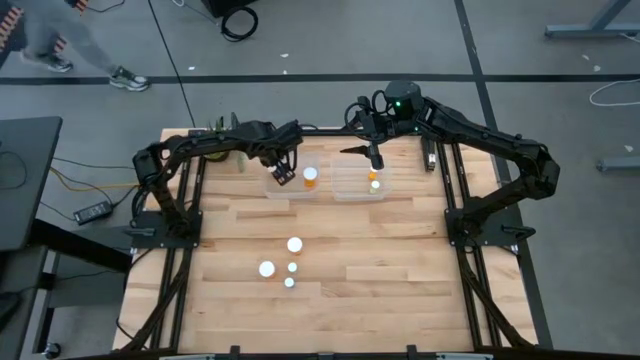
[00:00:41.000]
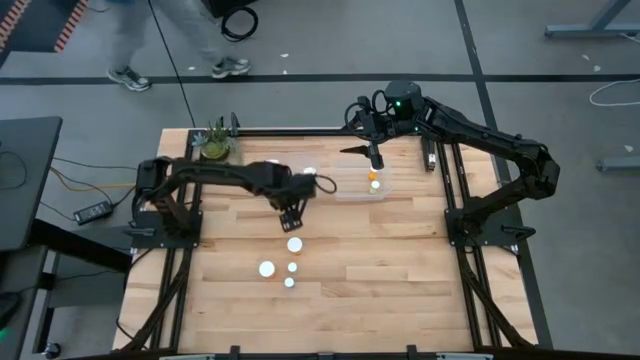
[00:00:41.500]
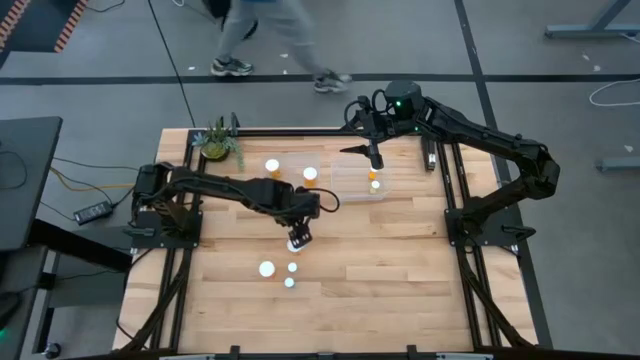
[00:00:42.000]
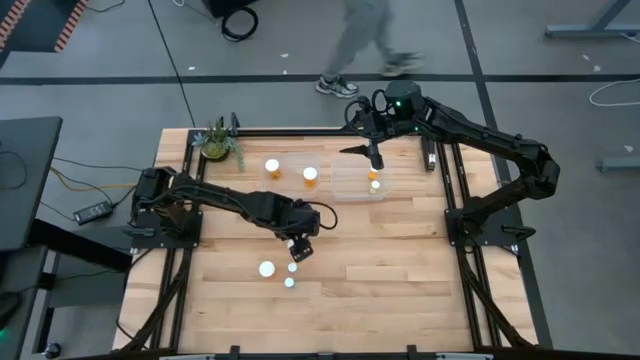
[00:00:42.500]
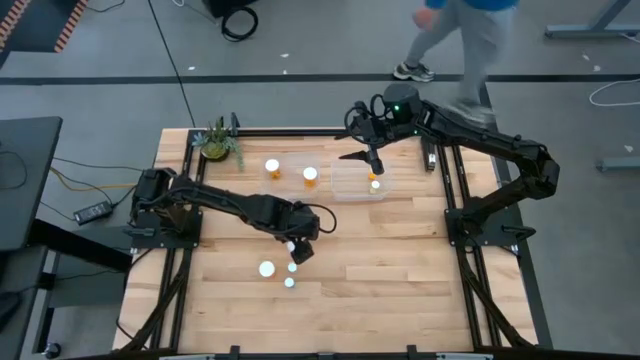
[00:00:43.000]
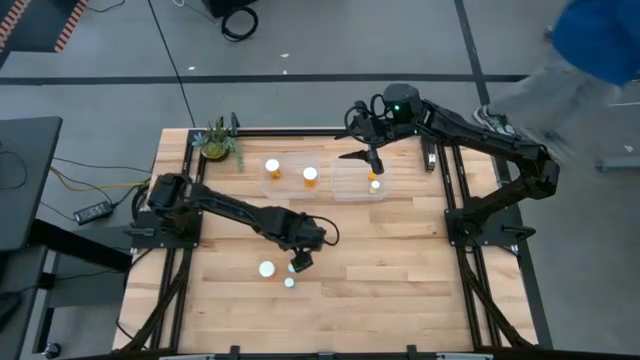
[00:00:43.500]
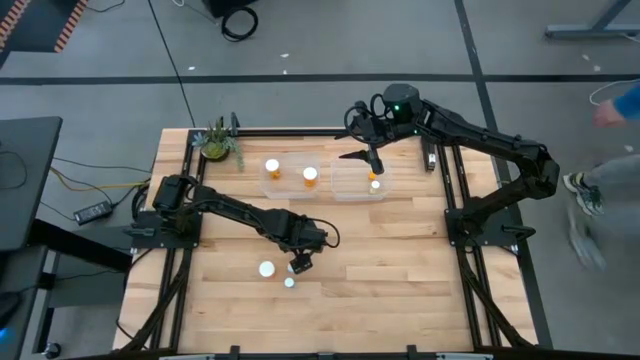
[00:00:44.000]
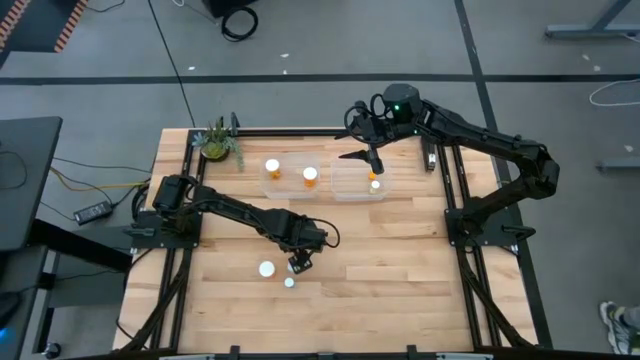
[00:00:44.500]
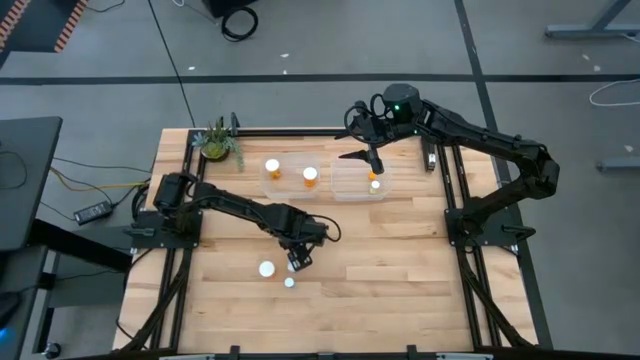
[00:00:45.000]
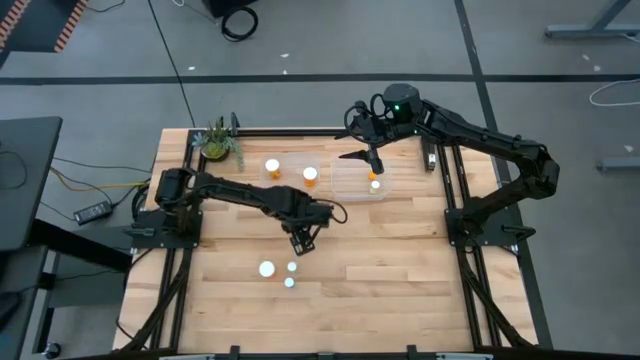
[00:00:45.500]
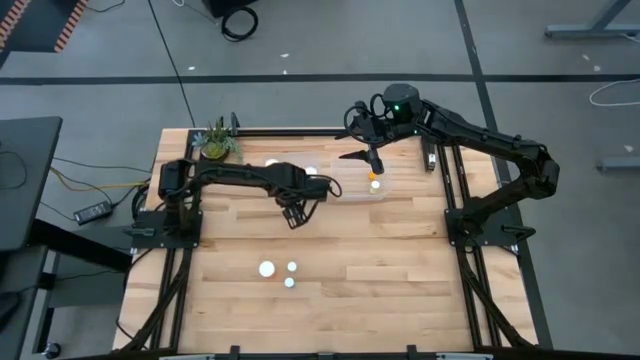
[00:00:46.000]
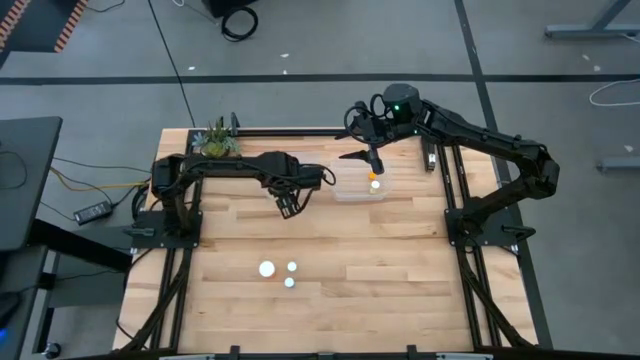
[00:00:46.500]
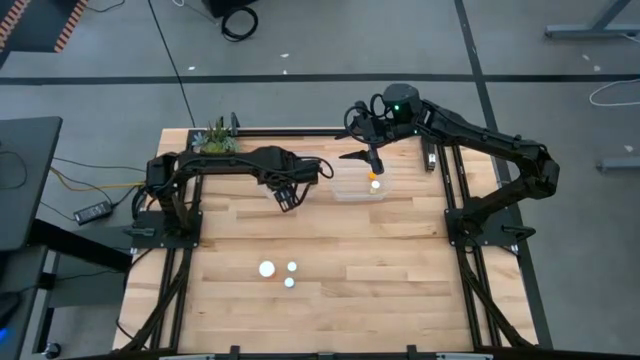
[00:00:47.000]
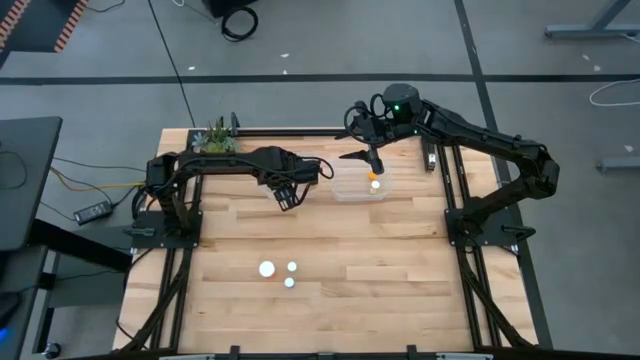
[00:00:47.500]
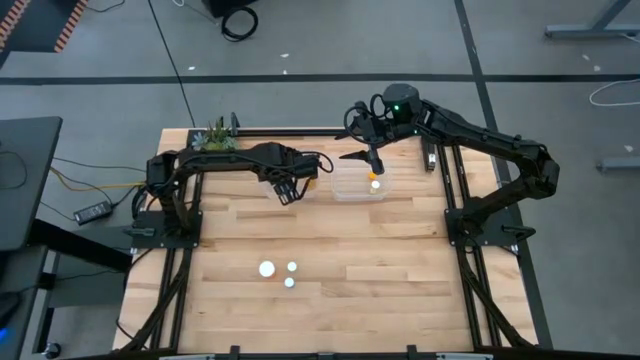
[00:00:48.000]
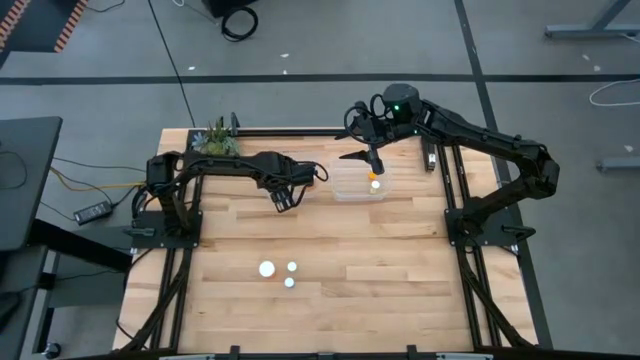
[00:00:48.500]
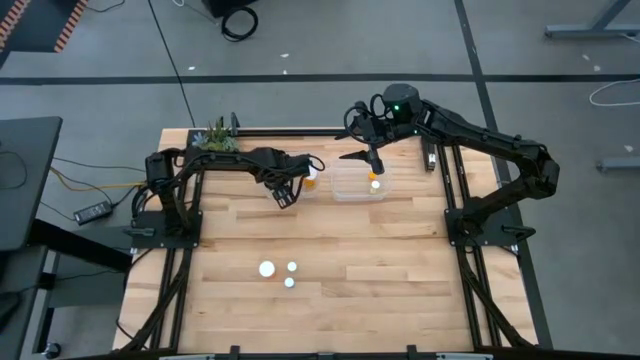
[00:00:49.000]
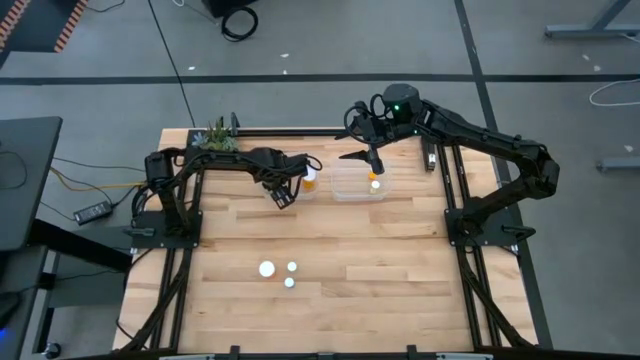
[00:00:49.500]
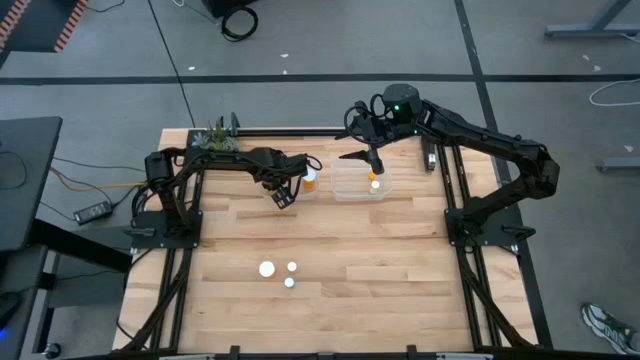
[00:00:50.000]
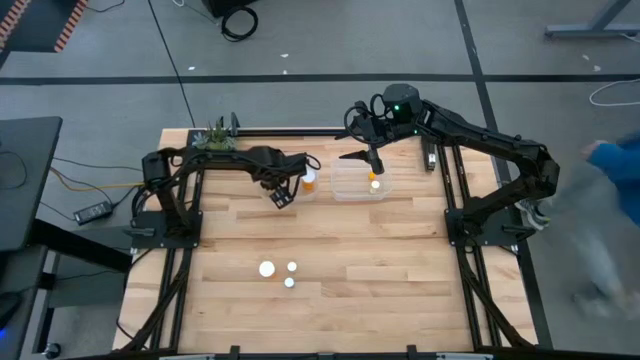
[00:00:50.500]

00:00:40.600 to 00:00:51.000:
Task: Pick and place medicine bottles into bin by pill shape (circle, oval)
Put the large orange pill bottle into the left transparent bin

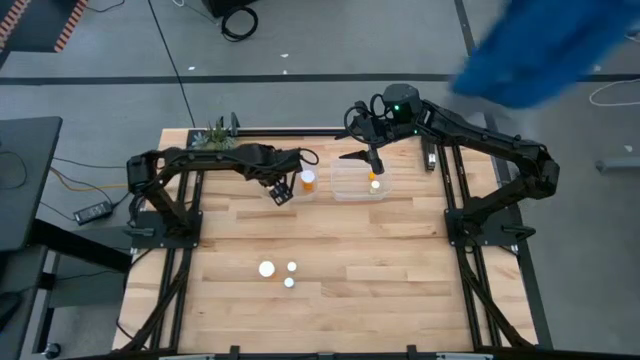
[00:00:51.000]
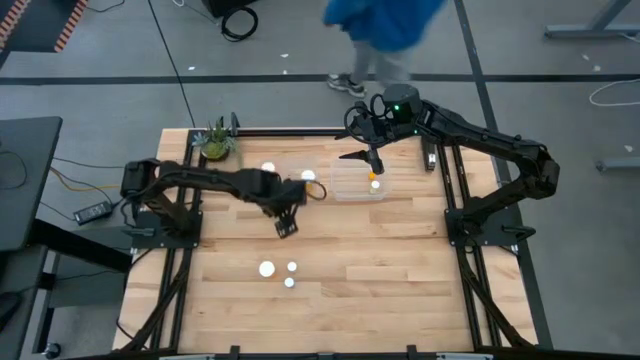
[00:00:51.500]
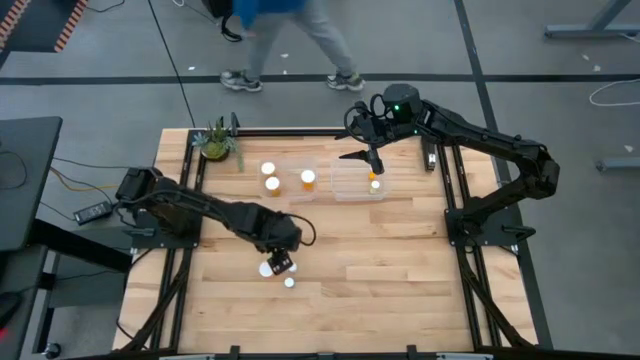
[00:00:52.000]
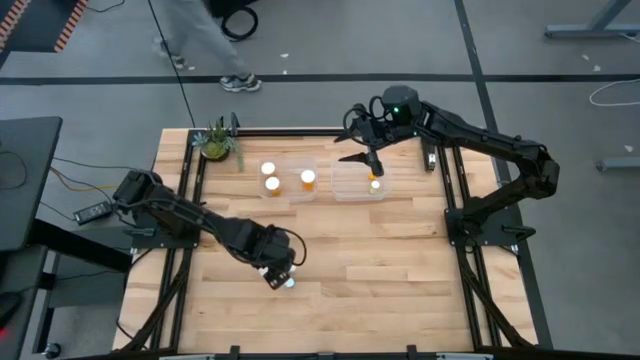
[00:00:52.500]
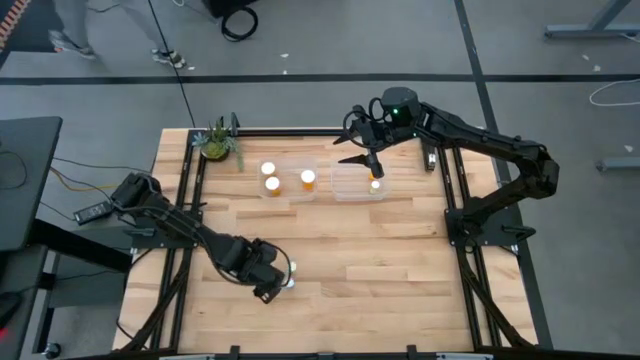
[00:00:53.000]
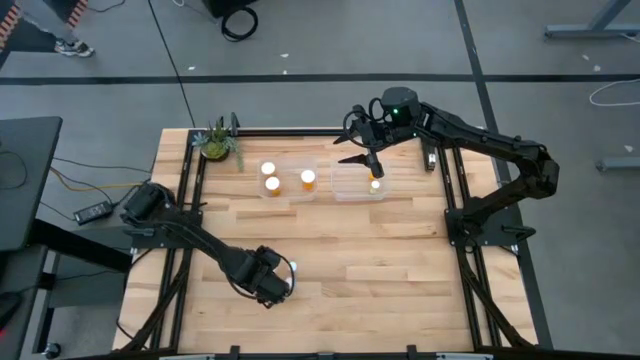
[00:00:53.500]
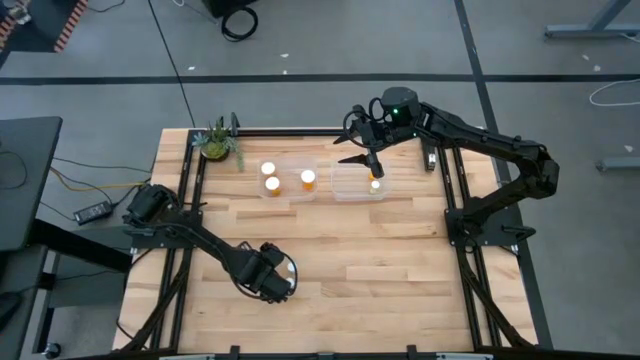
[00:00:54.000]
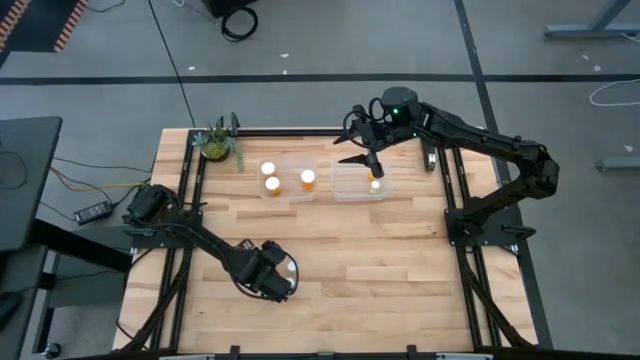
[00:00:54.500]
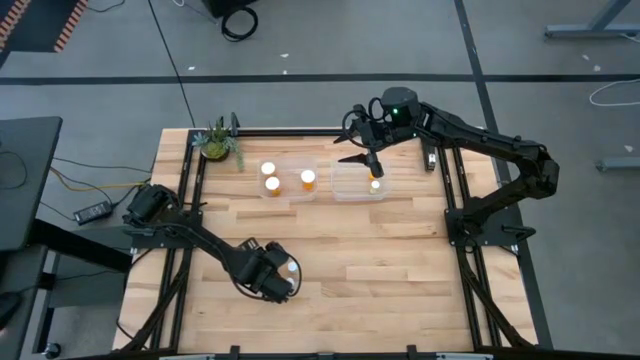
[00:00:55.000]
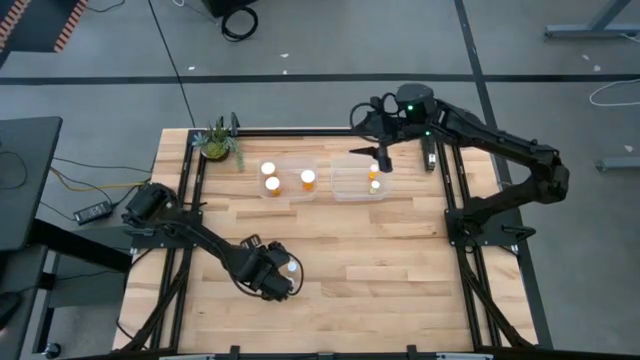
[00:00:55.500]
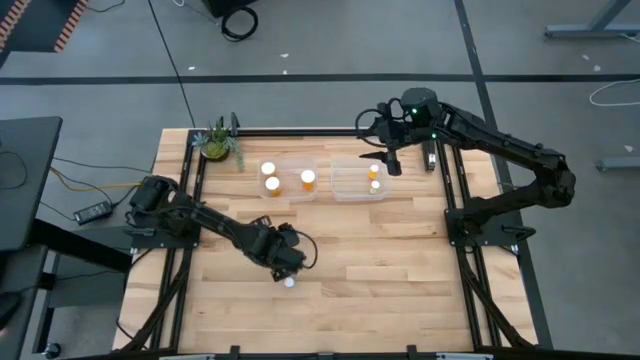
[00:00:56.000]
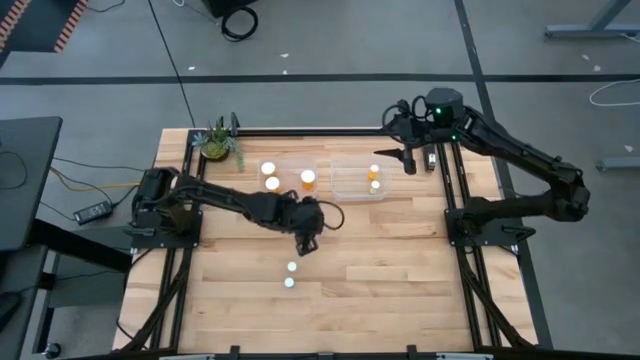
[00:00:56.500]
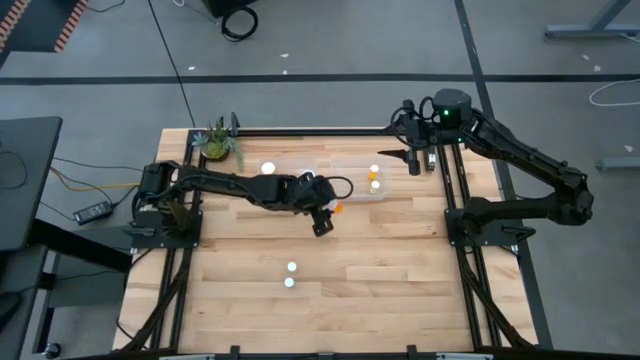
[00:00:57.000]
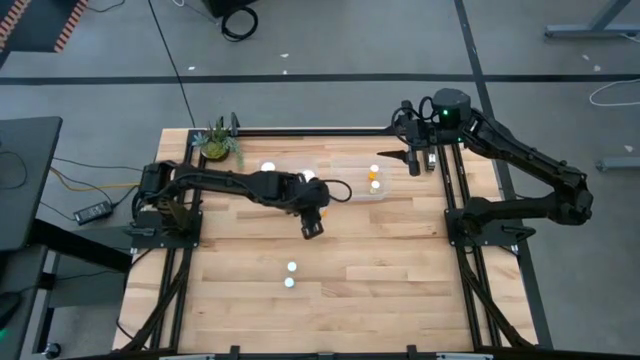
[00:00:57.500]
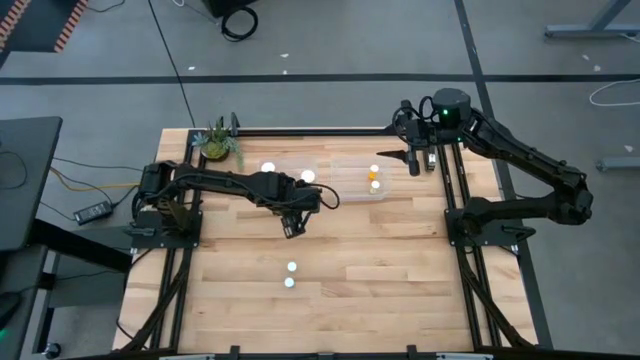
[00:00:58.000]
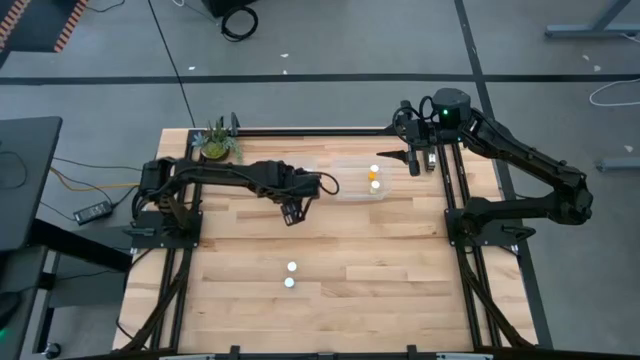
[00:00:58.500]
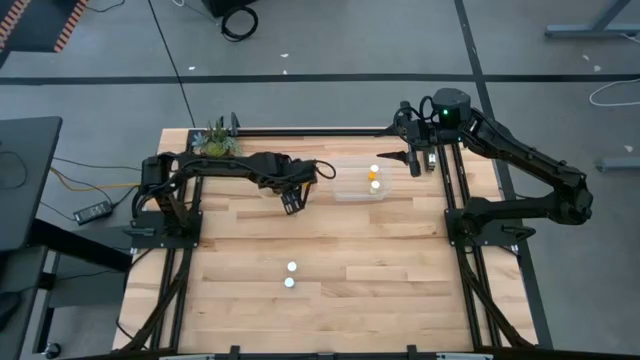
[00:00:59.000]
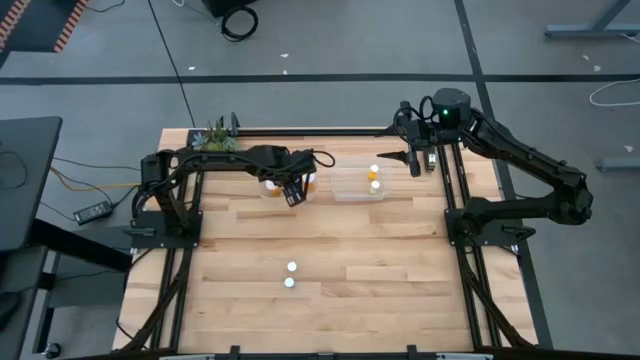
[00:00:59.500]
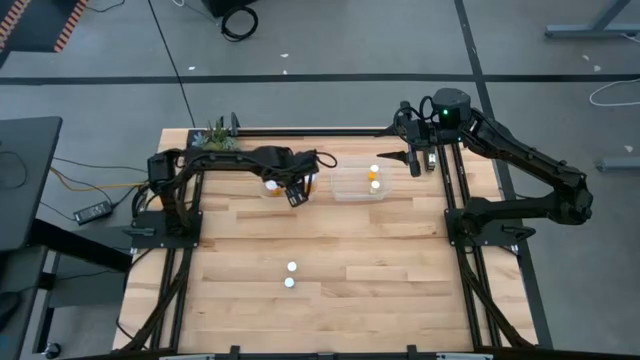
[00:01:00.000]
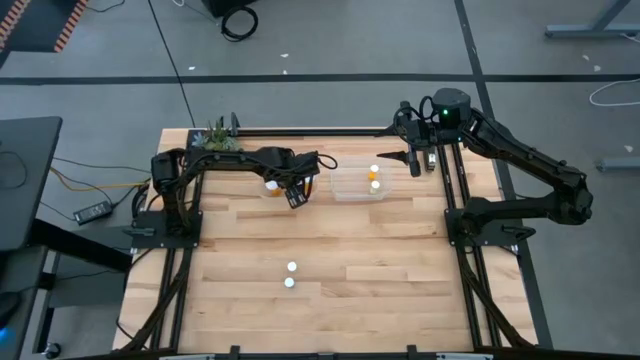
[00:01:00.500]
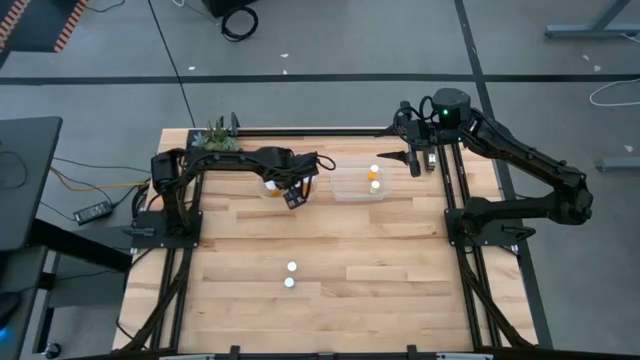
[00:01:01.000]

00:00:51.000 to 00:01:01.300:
Put the large orange pill bottle into the left transparent bin

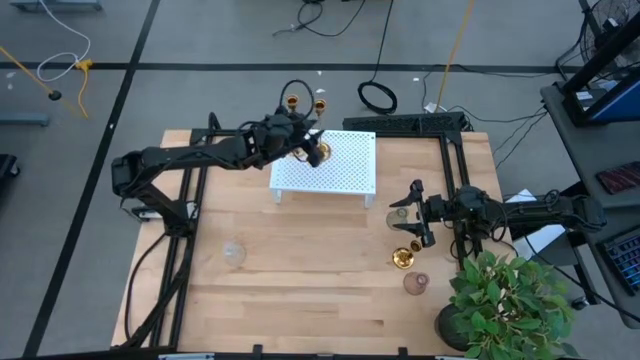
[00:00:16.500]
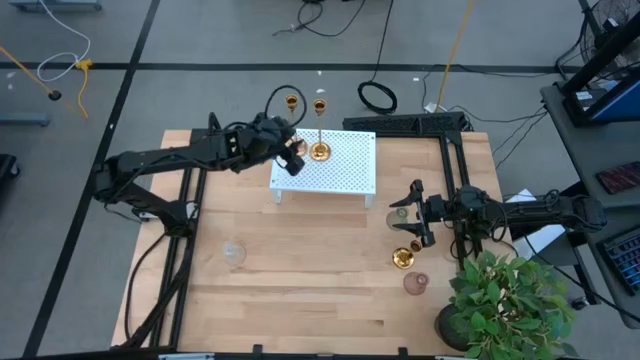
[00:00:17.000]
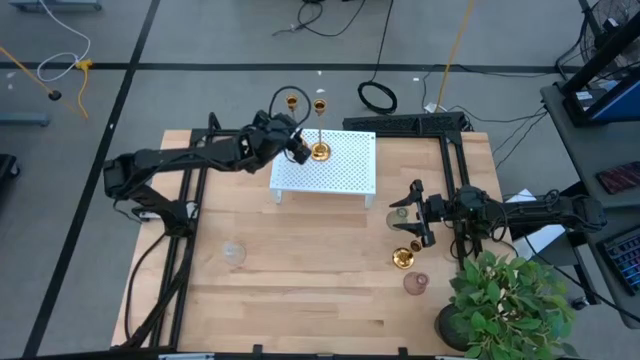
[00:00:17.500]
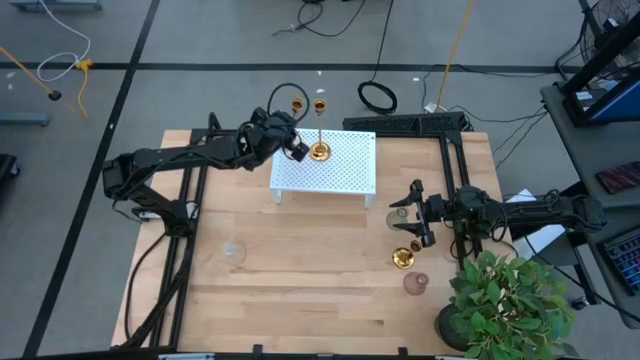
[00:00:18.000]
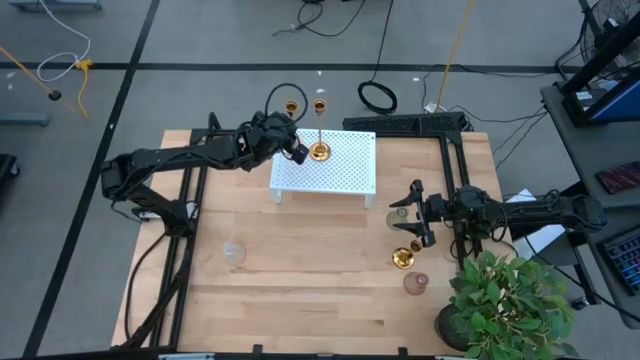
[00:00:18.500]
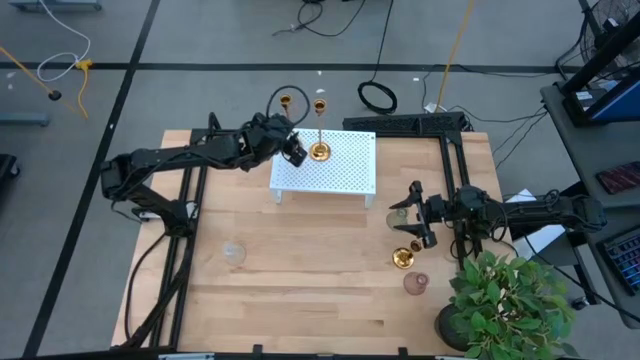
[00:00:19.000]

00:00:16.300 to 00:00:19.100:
Task: Pick & Place candle stick holders
Adjust the left long gold candle holder on the shelf
